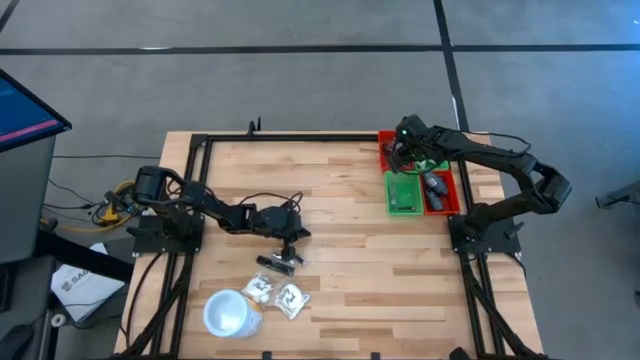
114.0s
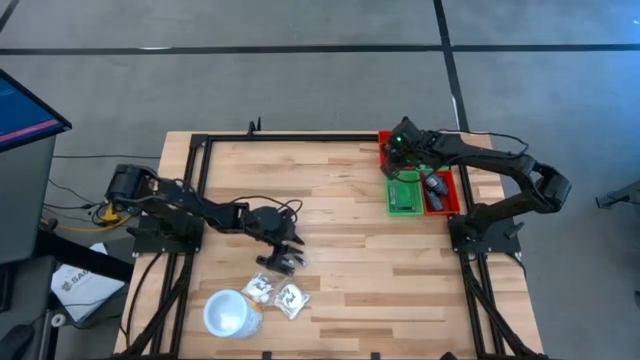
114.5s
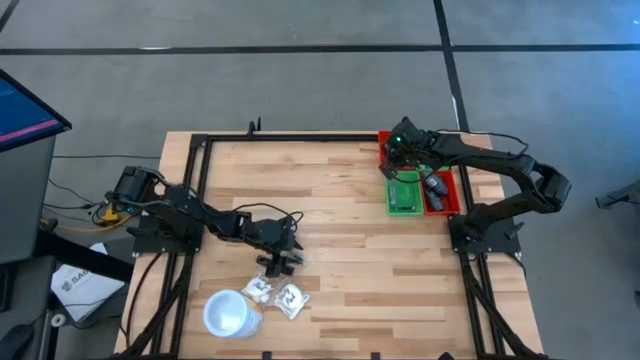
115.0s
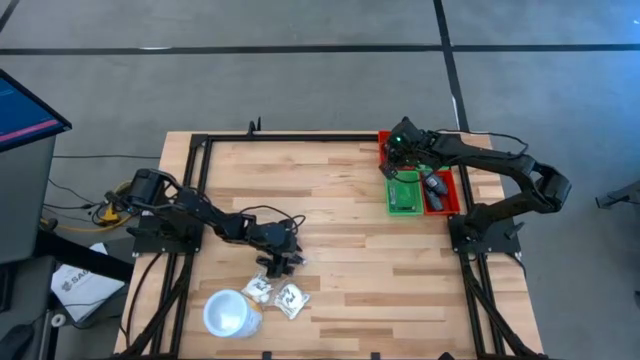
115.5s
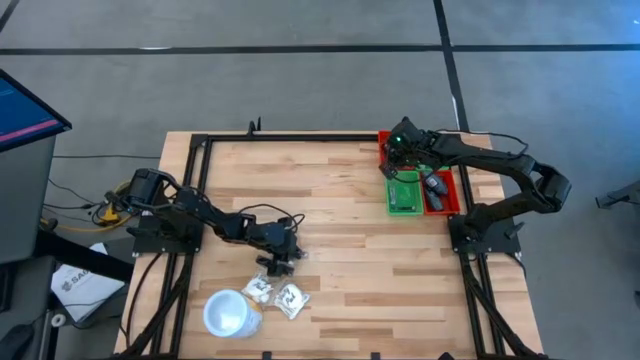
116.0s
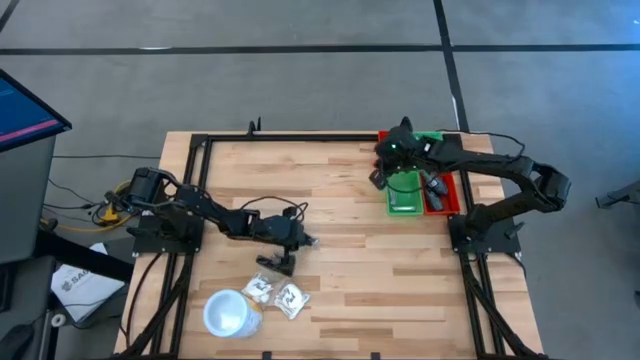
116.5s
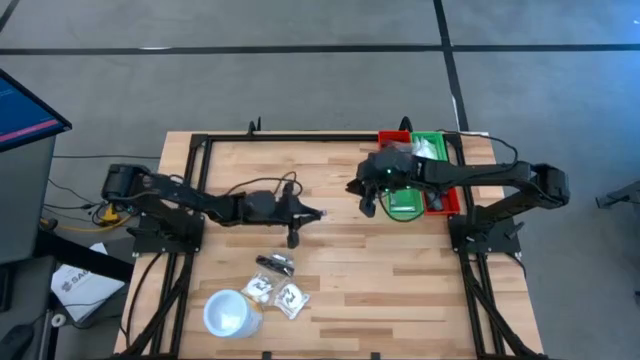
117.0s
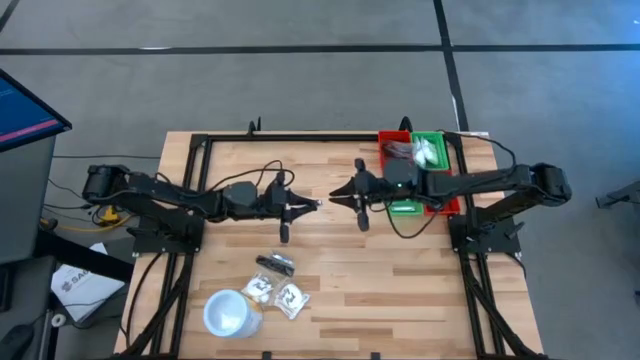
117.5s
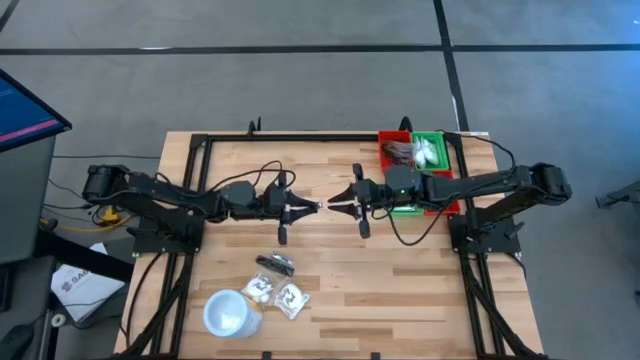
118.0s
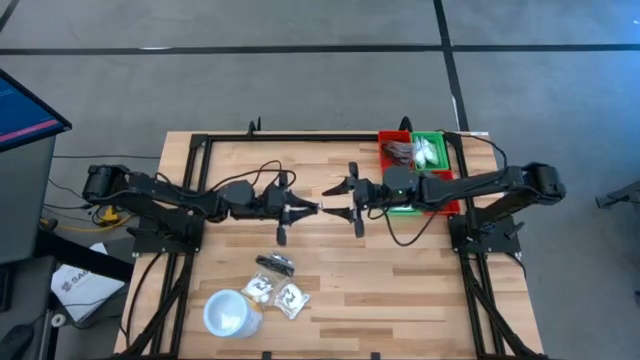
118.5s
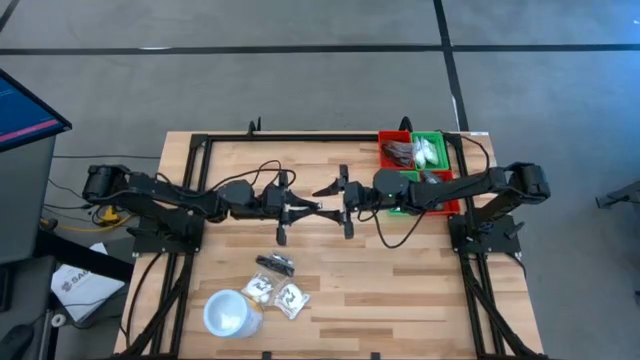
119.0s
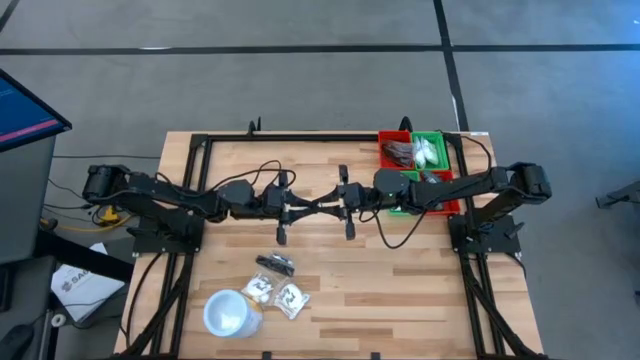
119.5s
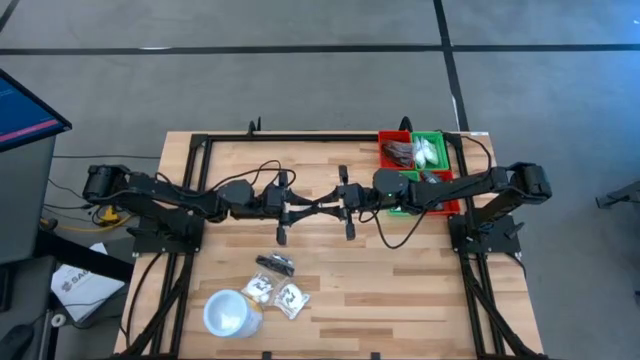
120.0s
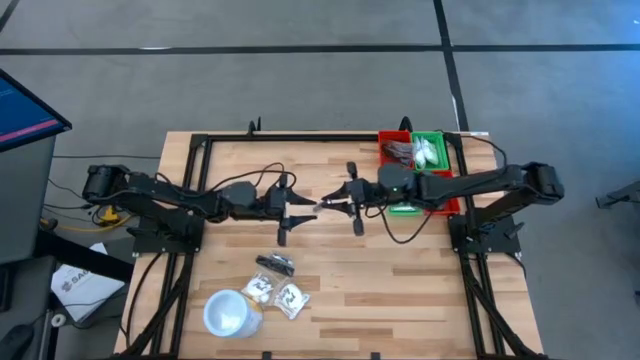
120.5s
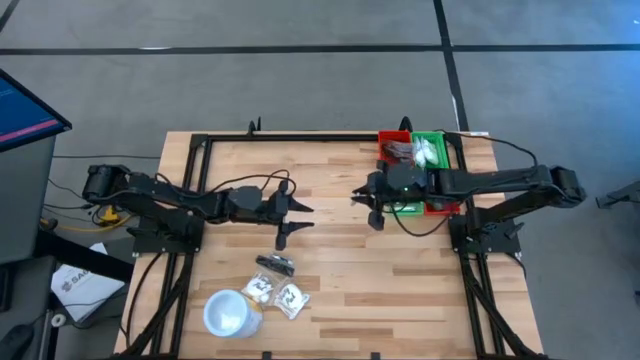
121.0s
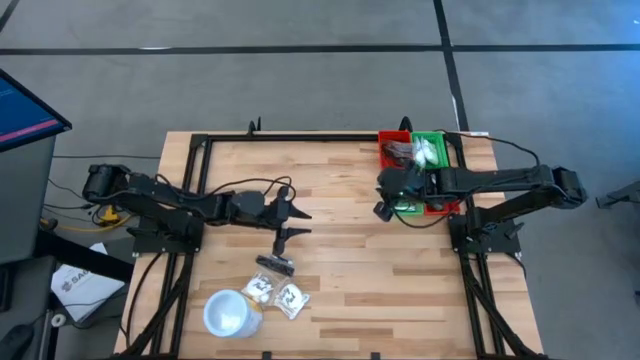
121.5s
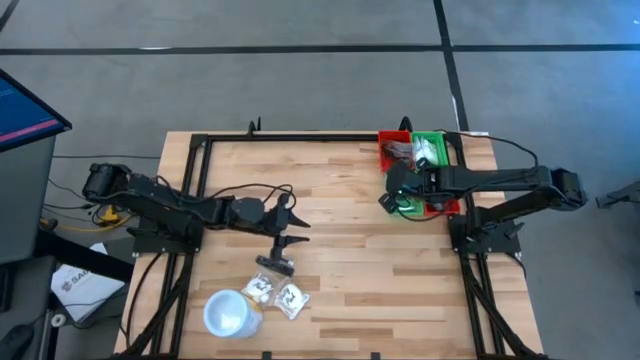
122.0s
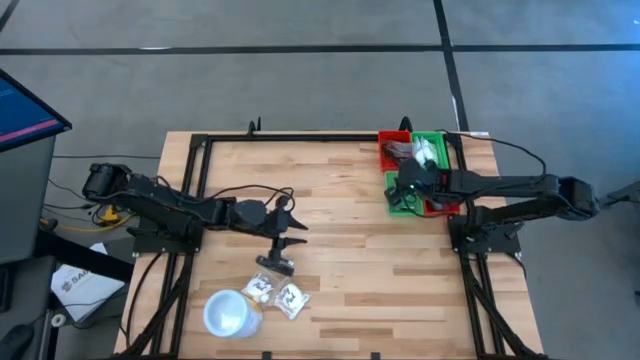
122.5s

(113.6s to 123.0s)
Task: Pick & Place Travel size toiletries
Put the silver nail cutter into the bottom green bin

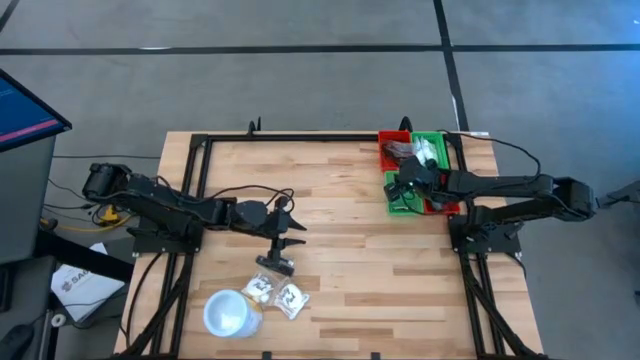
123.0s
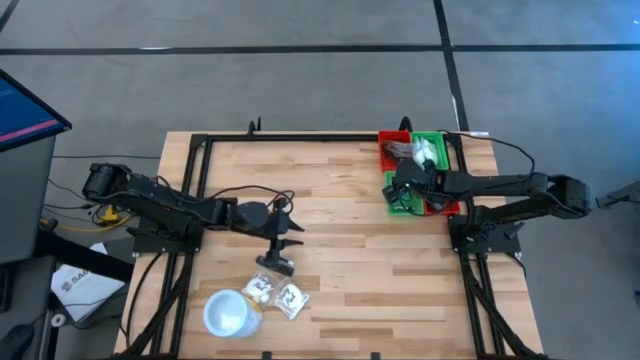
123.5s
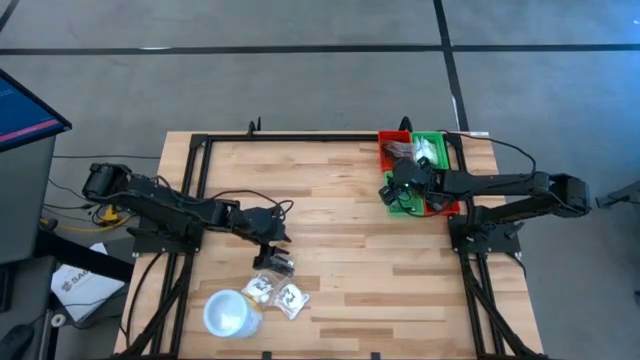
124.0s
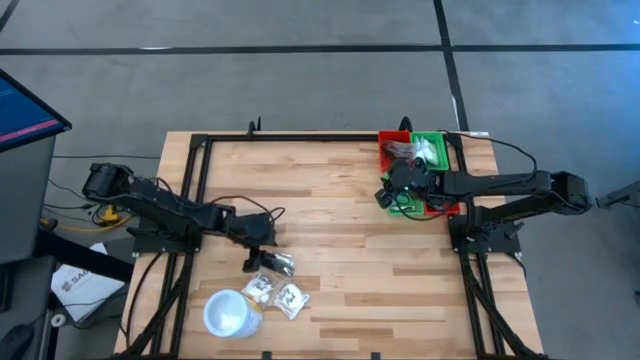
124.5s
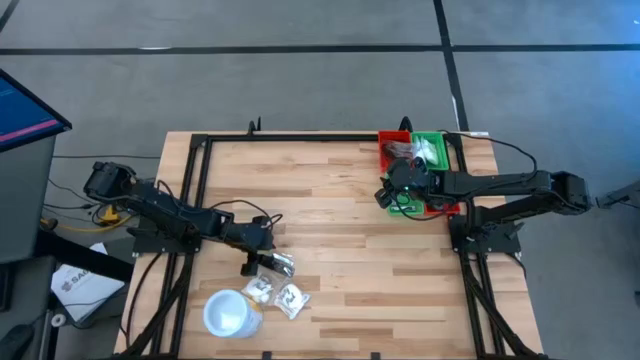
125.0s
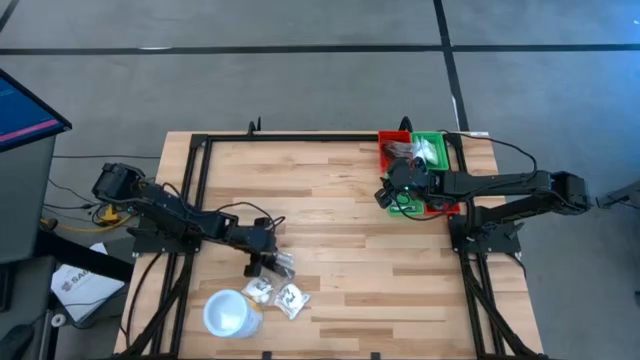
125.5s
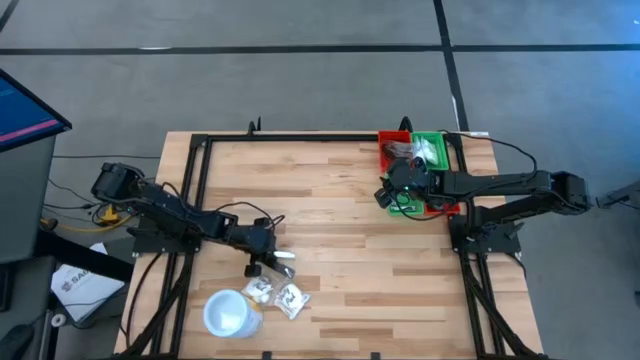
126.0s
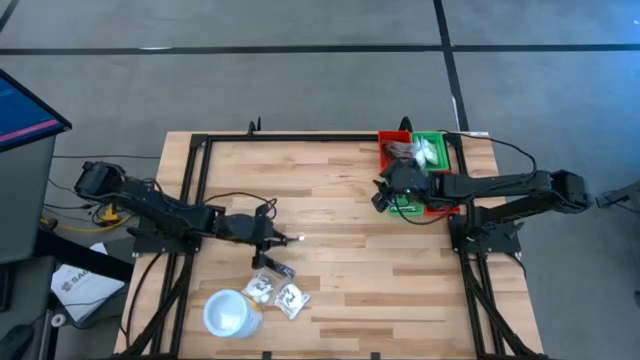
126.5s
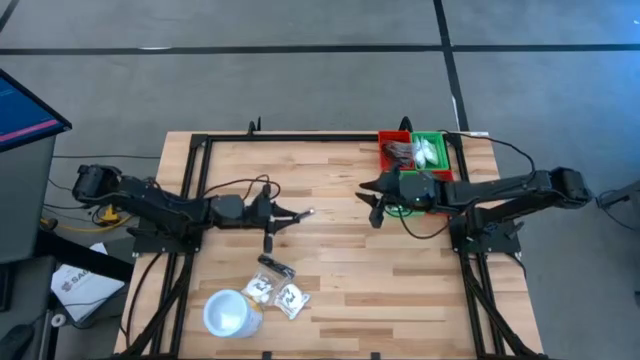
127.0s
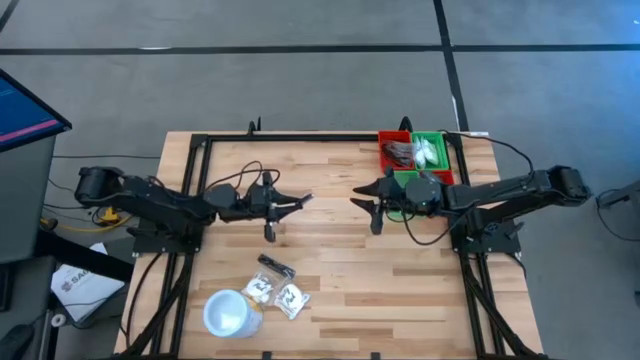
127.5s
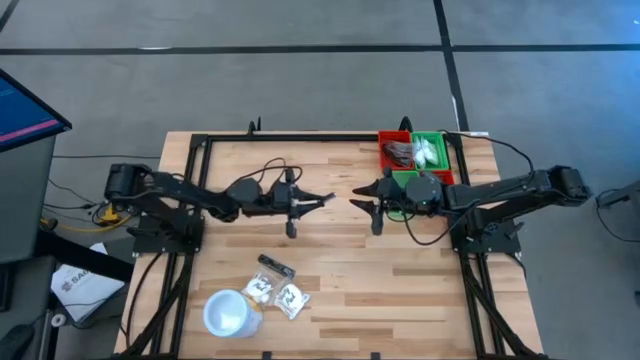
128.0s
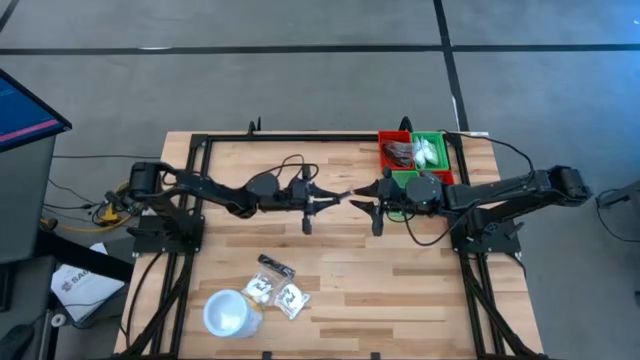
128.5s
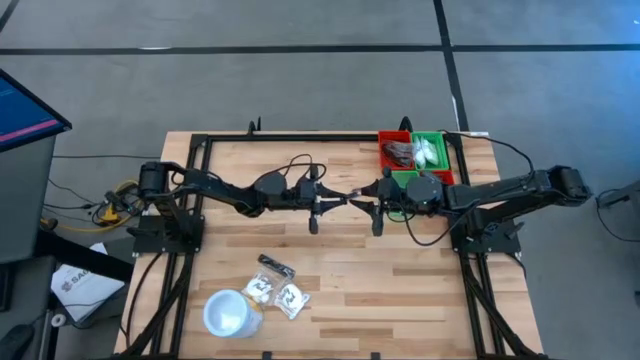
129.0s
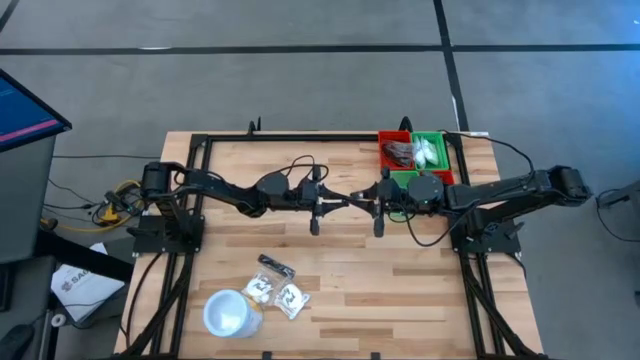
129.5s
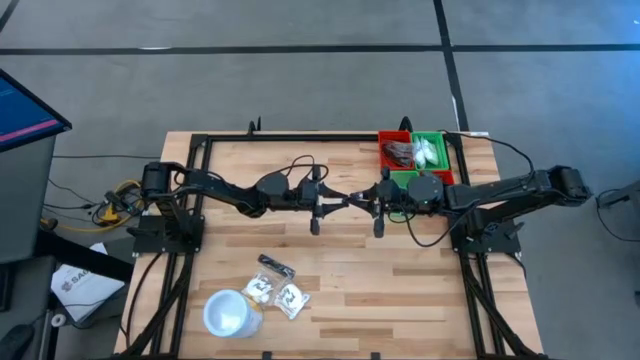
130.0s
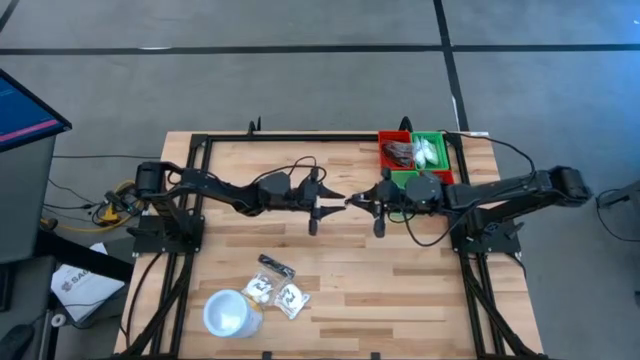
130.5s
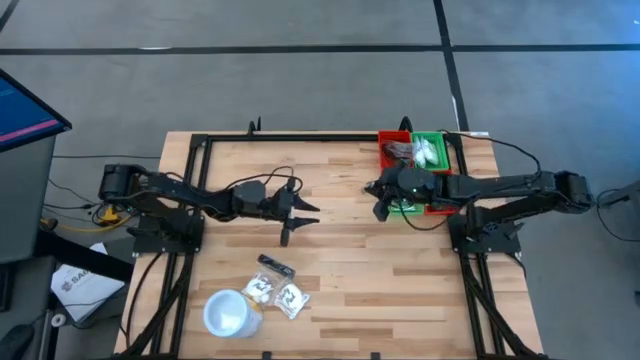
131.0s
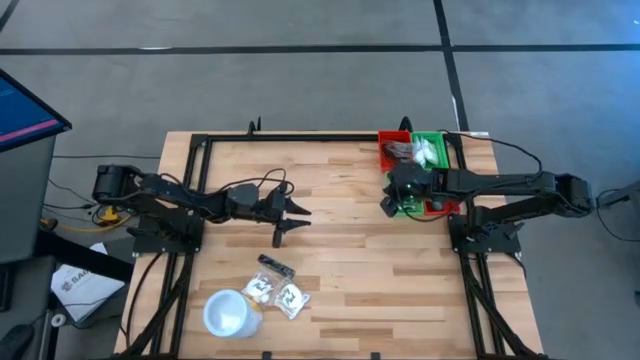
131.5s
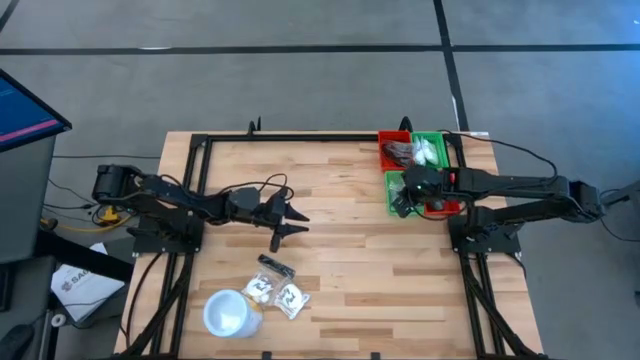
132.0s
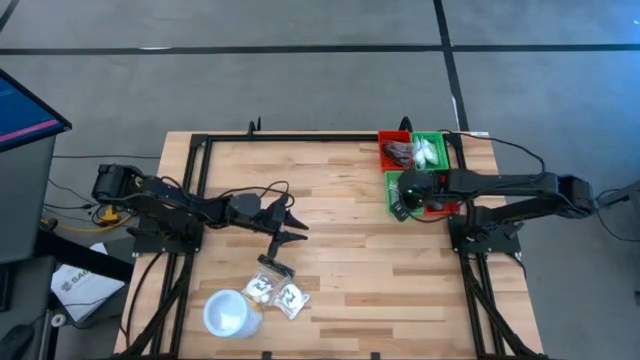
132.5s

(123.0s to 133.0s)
Put the silver nail cutter into the bottom green bin

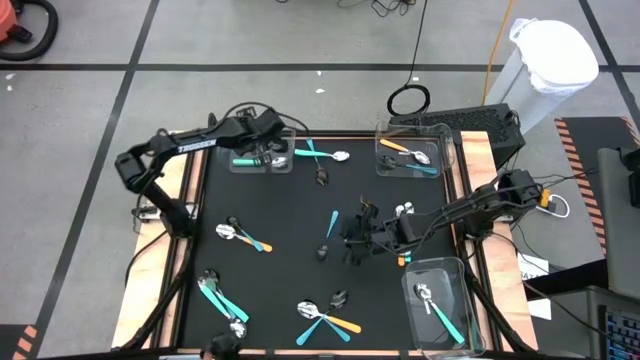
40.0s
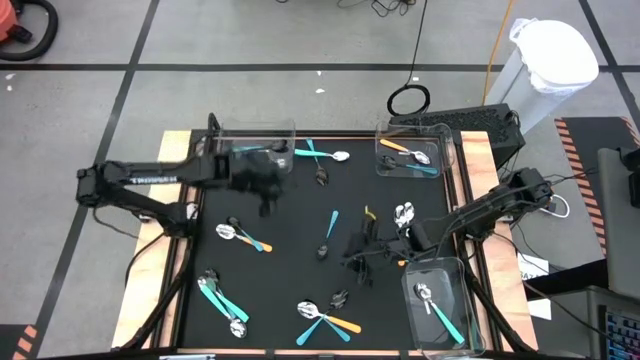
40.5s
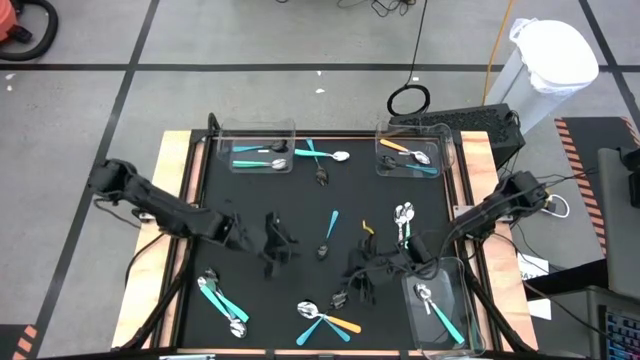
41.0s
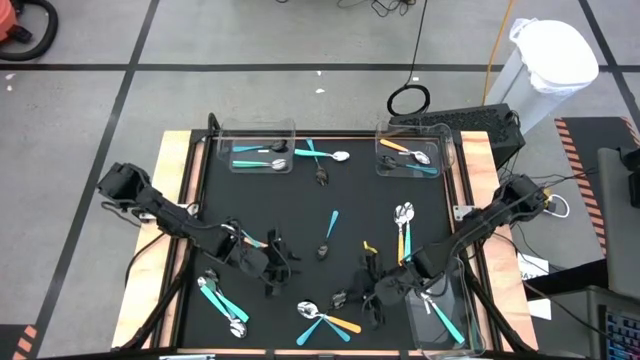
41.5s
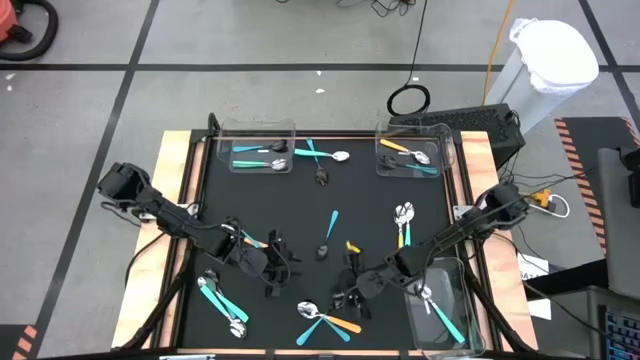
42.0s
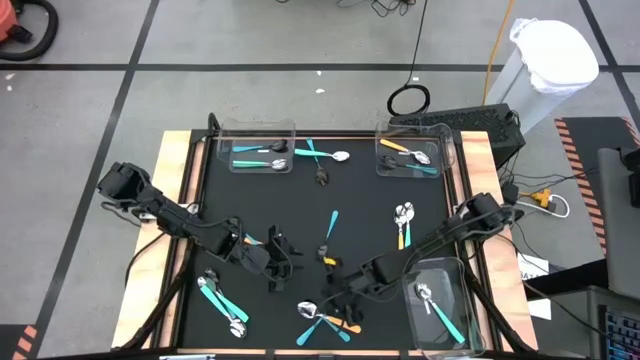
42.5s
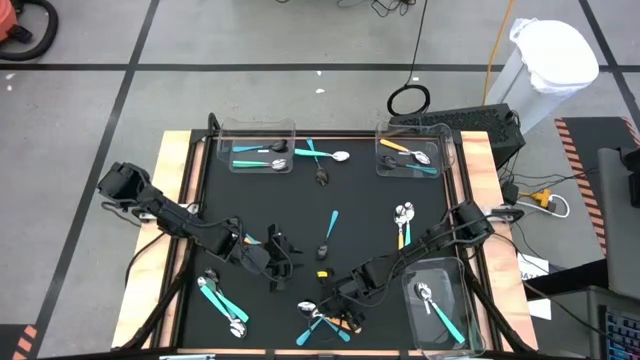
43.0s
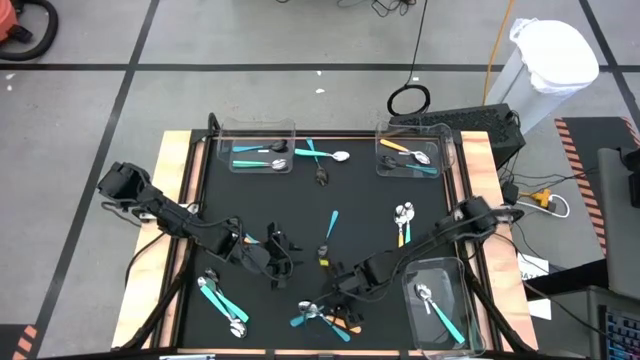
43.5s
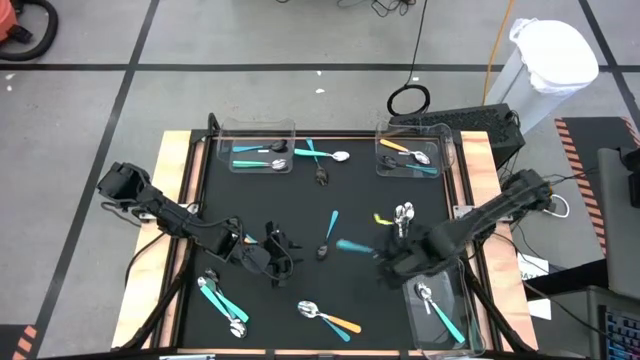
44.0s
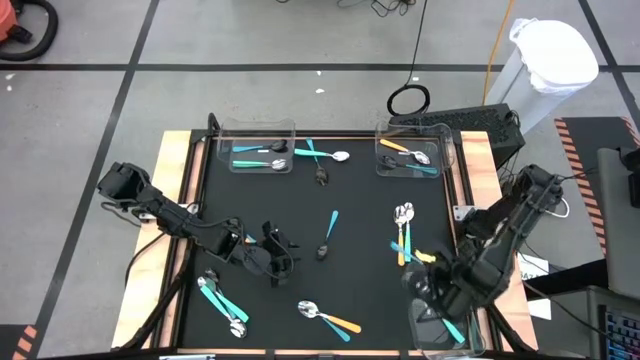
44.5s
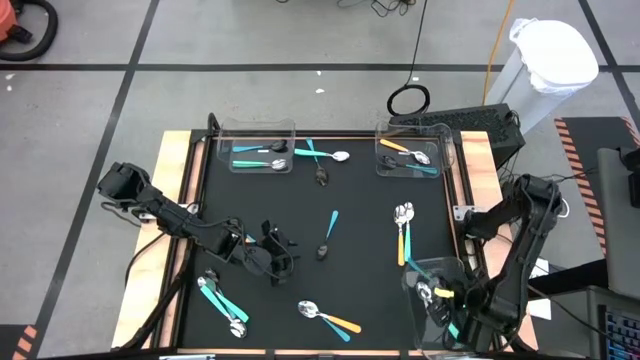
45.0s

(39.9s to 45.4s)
Task: Sort silverware by color (type)
Put the blue spoon into the bottom right transparent bin
